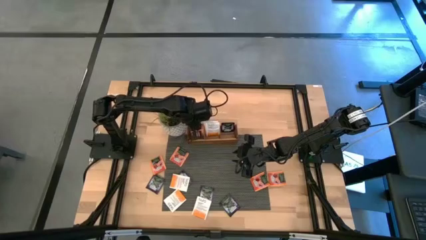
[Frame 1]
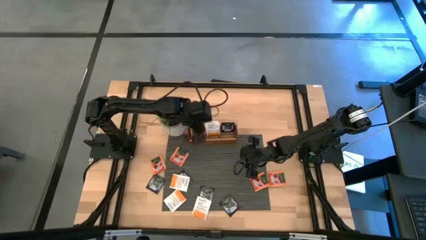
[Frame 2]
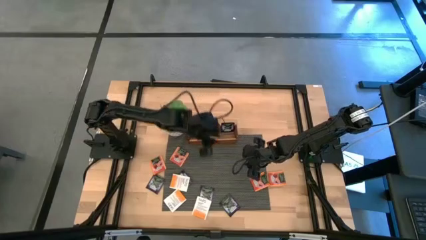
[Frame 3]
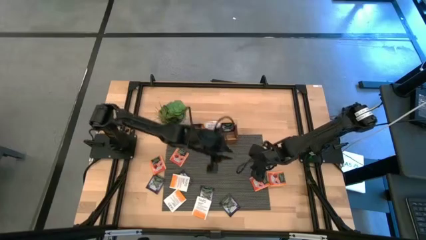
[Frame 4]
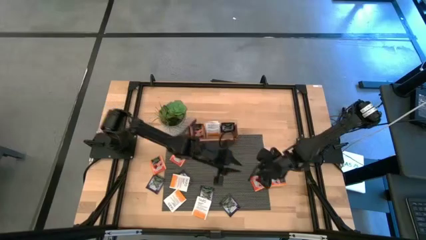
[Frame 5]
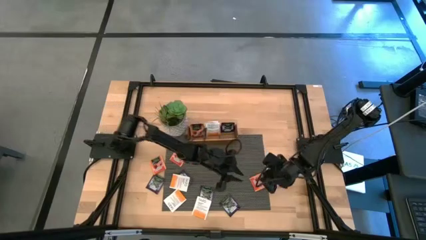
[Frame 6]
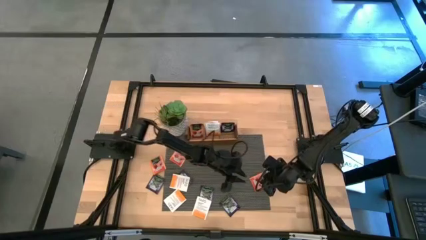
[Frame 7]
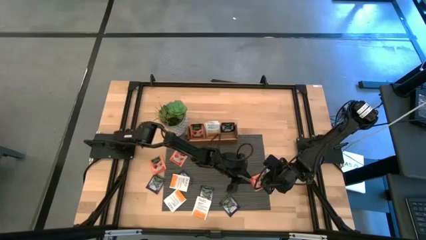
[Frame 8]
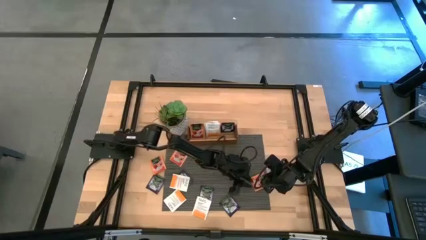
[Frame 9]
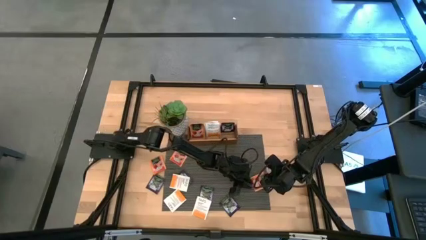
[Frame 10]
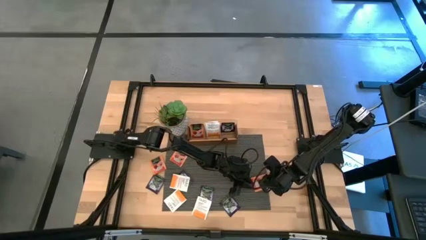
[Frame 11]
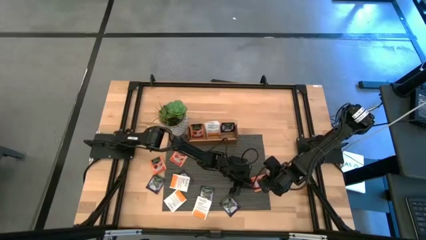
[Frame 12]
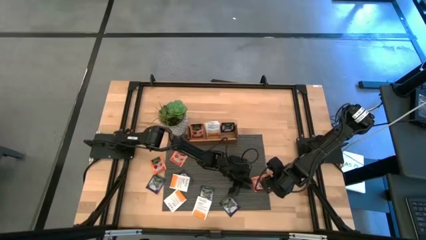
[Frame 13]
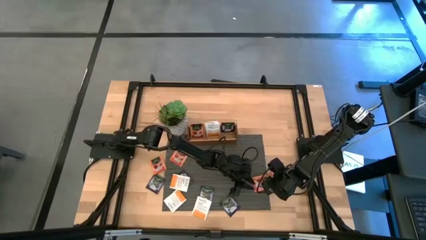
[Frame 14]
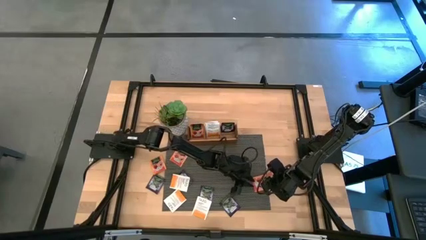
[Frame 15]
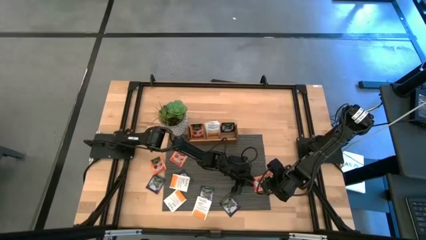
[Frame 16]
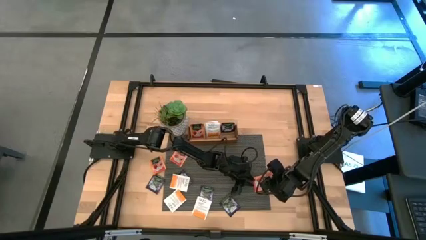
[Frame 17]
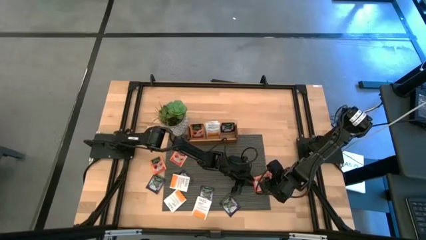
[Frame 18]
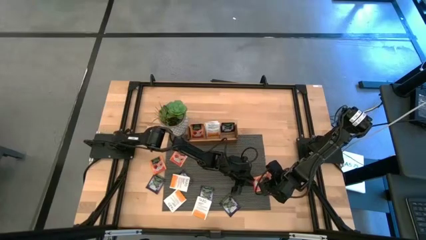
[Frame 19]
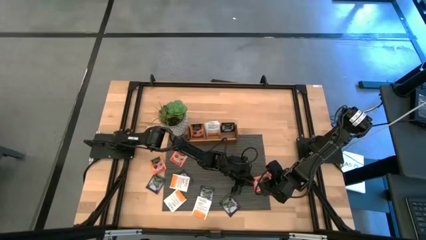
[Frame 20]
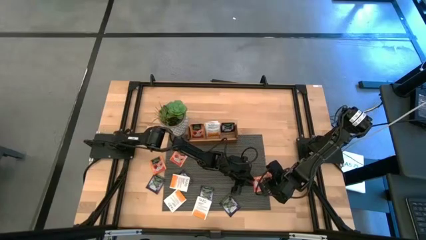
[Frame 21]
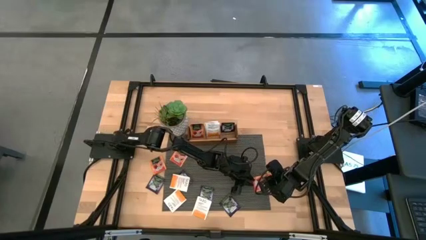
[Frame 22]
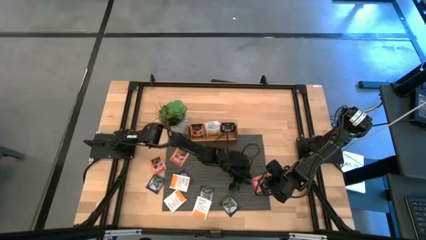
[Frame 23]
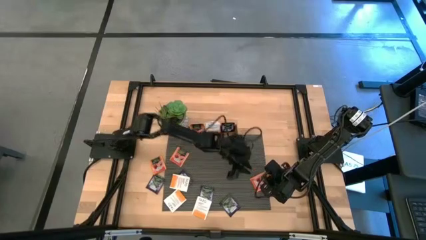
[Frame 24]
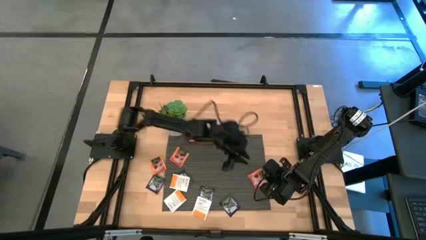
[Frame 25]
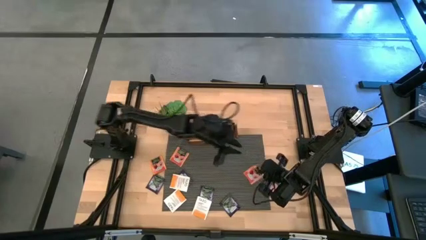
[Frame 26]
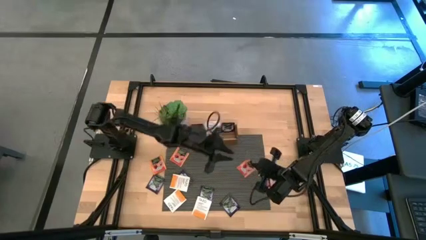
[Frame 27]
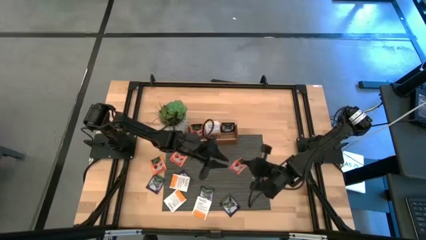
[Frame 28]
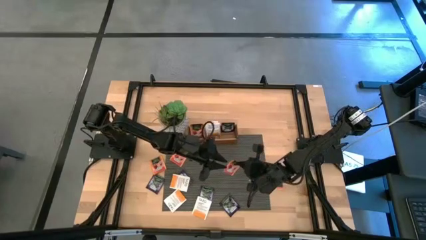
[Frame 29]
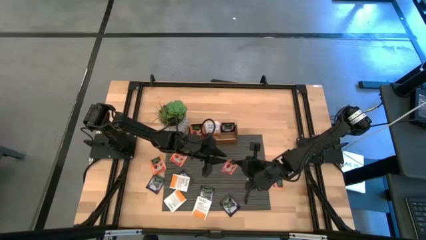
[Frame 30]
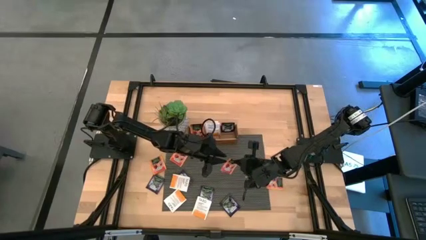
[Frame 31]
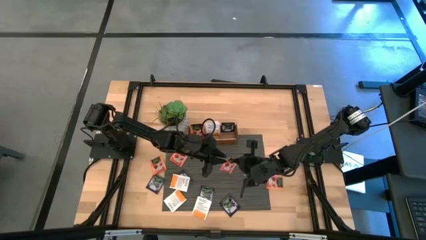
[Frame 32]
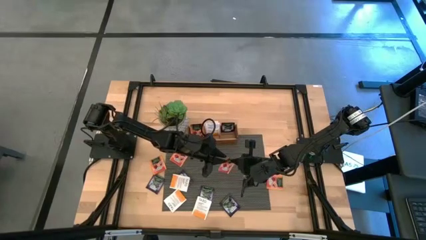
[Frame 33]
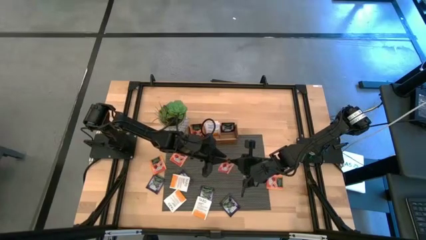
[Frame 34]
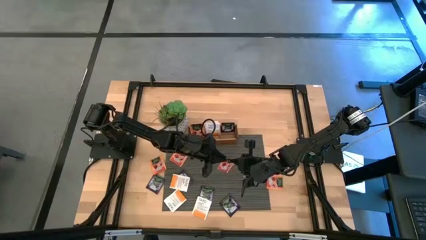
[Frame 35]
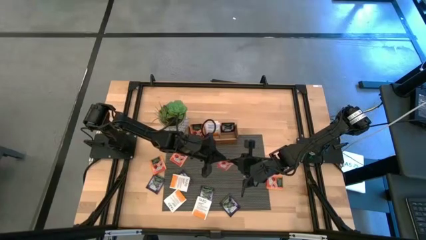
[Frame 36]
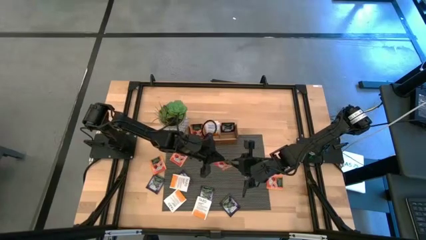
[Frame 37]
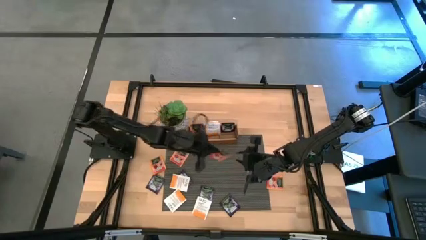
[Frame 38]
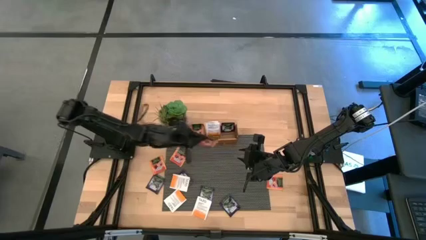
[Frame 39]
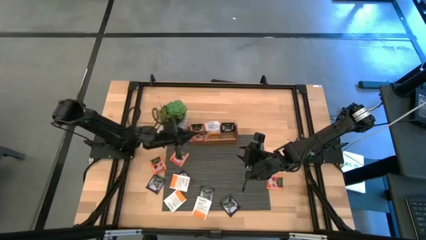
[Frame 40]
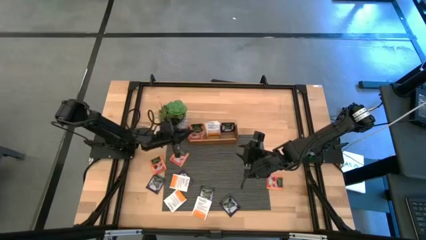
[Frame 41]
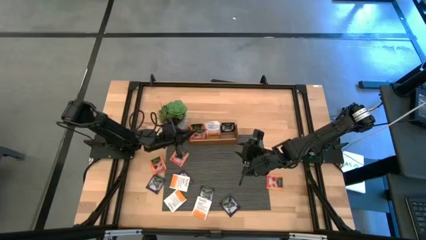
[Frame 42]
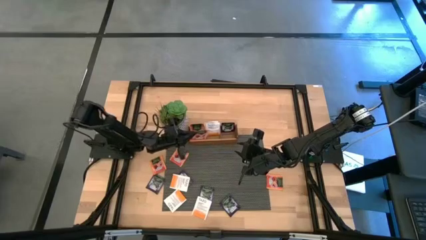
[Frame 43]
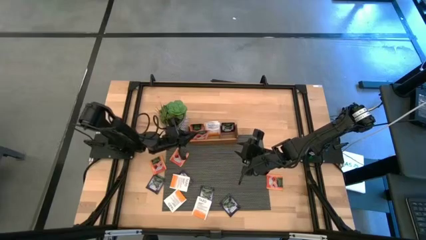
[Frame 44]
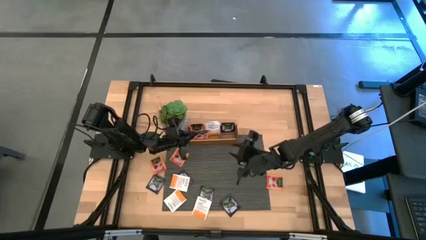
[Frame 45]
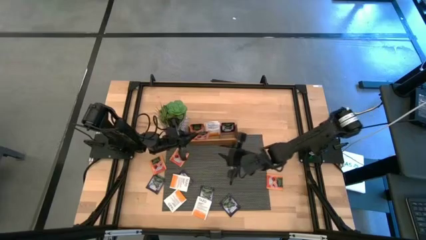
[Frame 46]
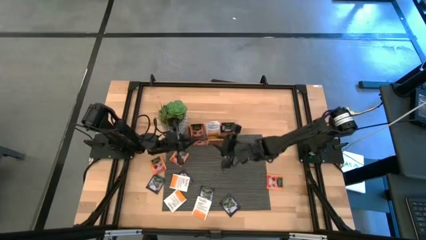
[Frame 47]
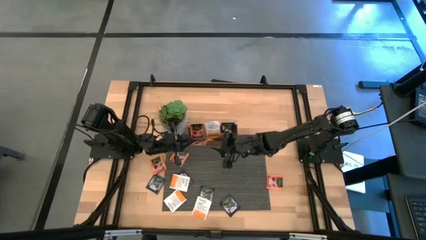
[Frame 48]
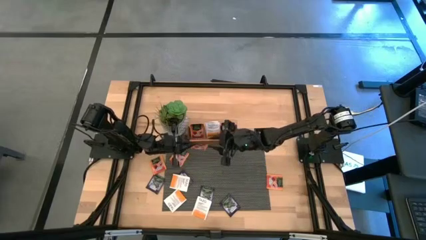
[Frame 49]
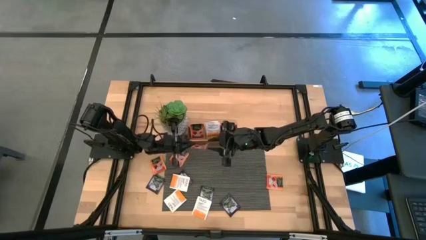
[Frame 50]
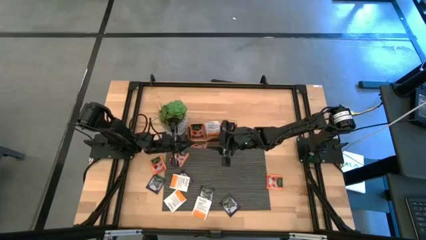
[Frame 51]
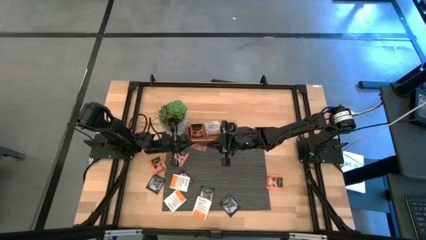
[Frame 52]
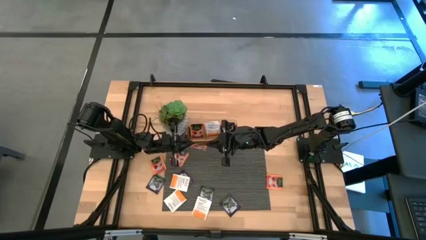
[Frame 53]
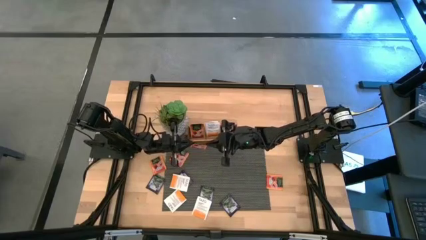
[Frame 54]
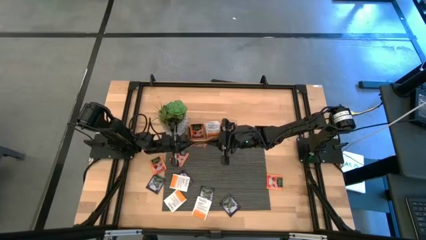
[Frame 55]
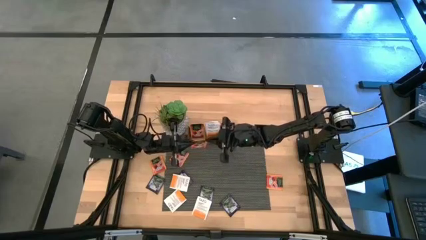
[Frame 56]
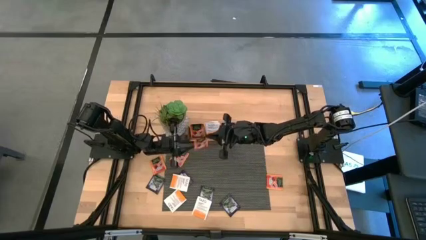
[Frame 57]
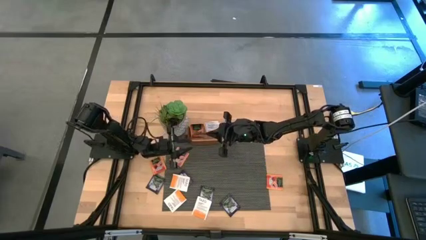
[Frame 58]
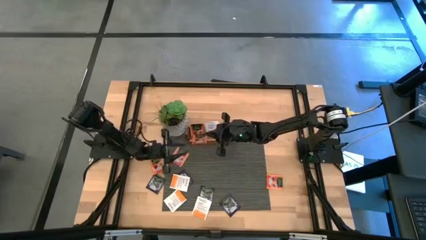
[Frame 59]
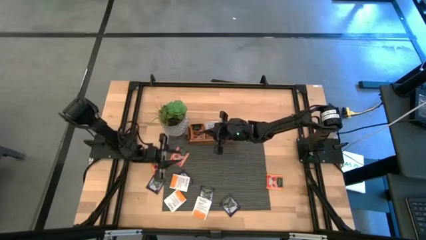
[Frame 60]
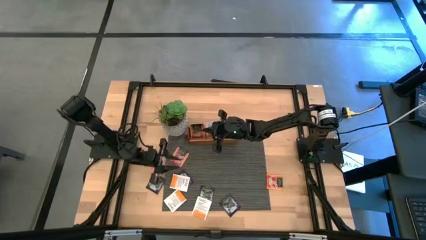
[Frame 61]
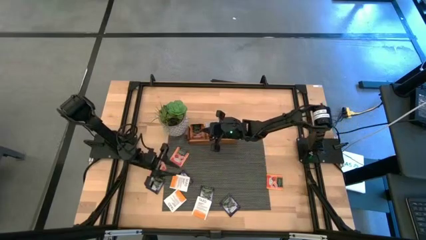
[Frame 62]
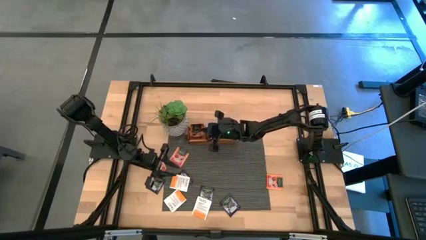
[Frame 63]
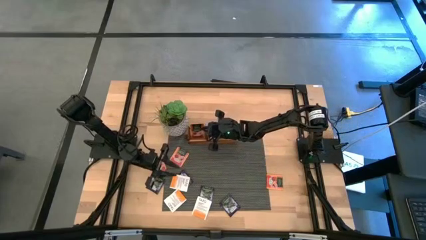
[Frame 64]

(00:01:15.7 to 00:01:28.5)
Task: Pick & Place Tea
Put the orange tea bag into the left slot of the wooden organizer
